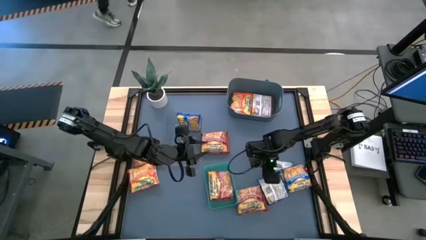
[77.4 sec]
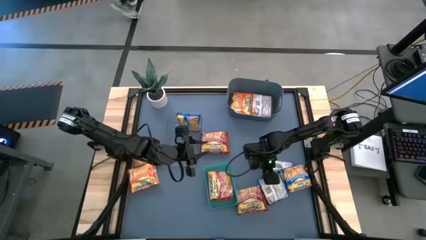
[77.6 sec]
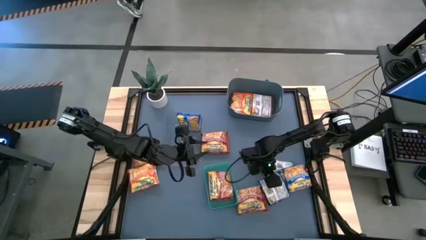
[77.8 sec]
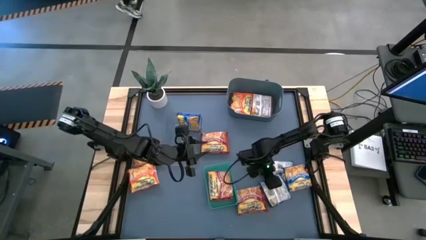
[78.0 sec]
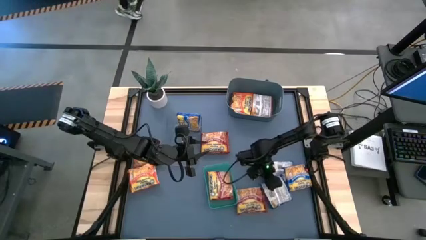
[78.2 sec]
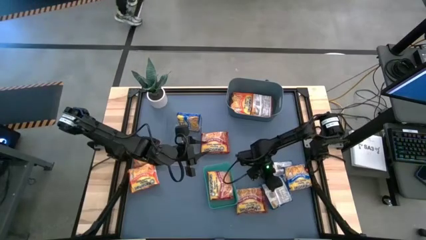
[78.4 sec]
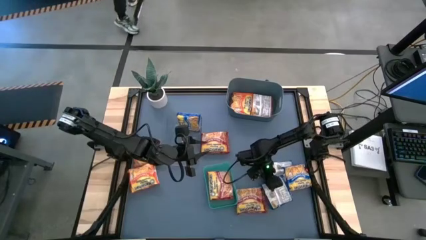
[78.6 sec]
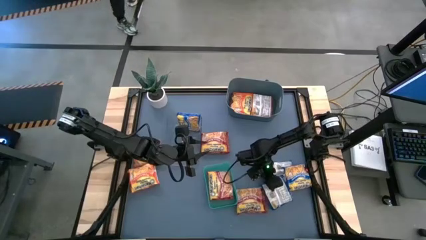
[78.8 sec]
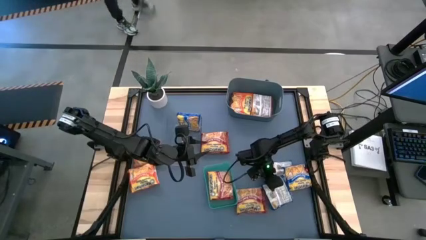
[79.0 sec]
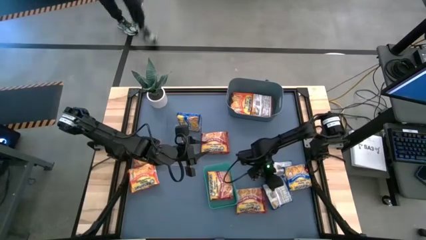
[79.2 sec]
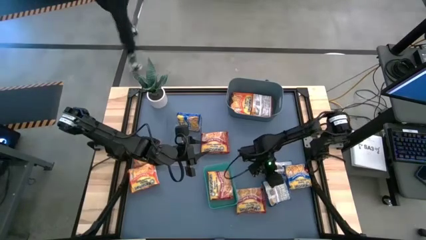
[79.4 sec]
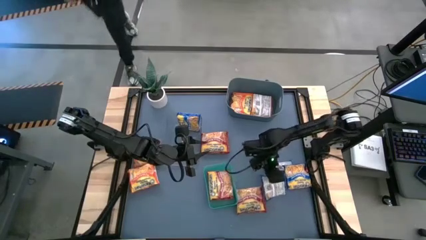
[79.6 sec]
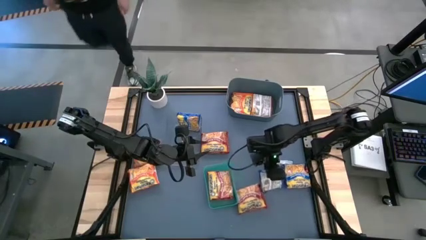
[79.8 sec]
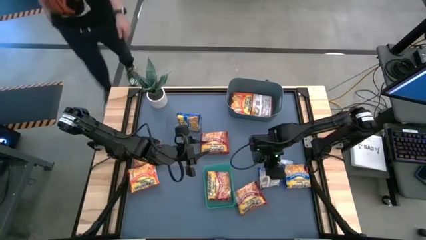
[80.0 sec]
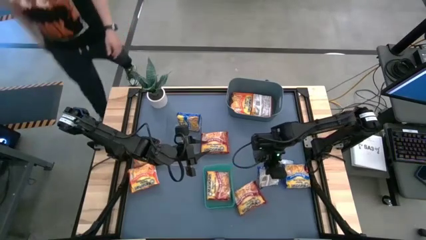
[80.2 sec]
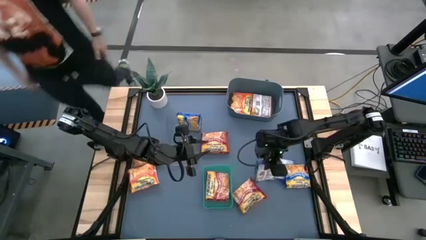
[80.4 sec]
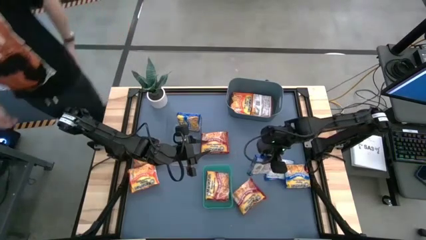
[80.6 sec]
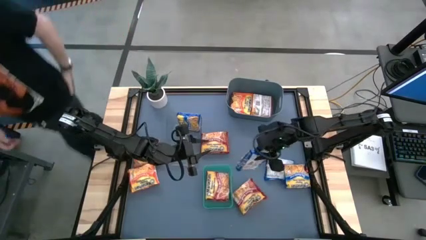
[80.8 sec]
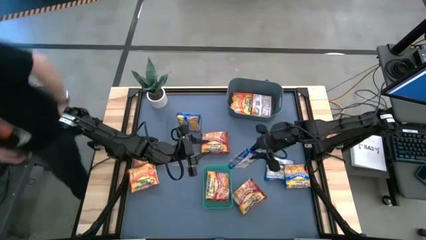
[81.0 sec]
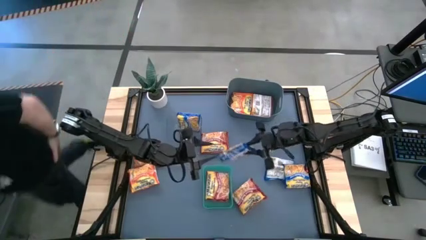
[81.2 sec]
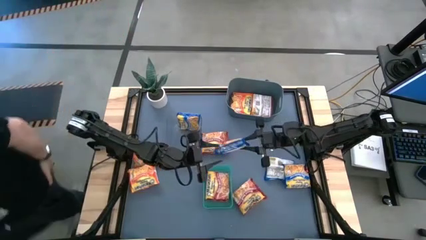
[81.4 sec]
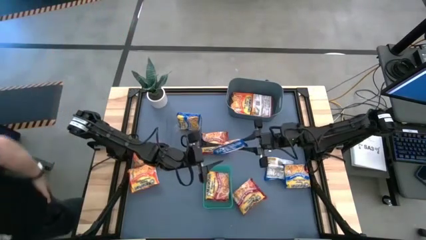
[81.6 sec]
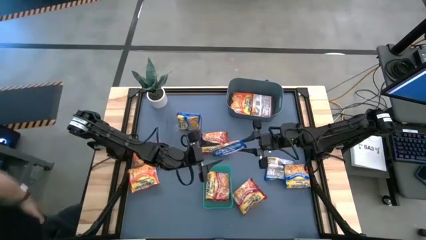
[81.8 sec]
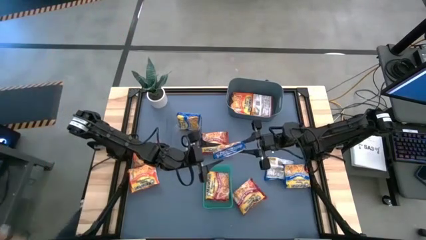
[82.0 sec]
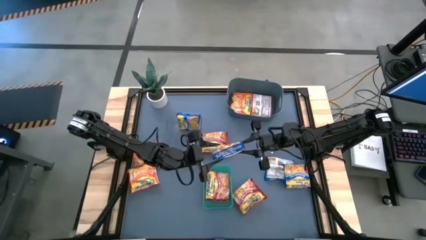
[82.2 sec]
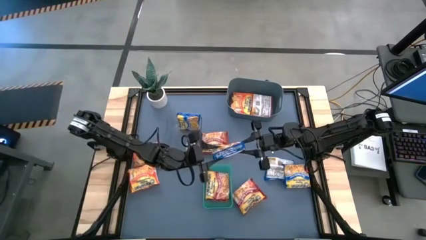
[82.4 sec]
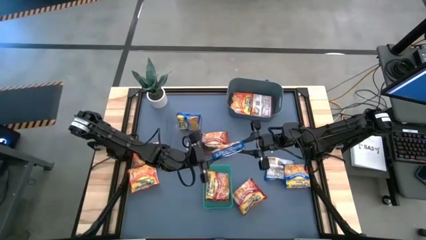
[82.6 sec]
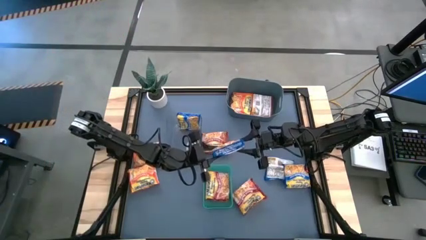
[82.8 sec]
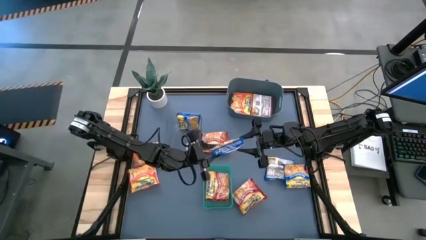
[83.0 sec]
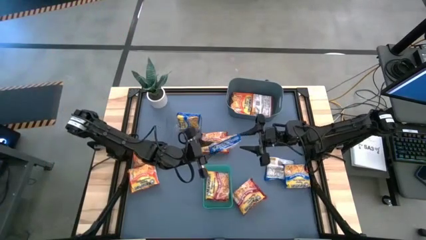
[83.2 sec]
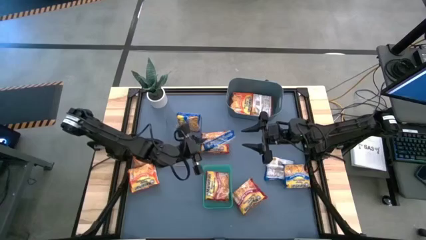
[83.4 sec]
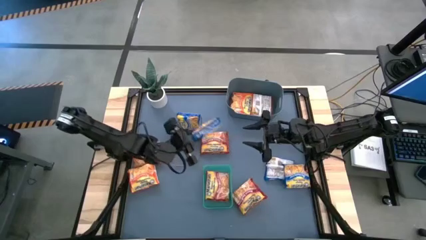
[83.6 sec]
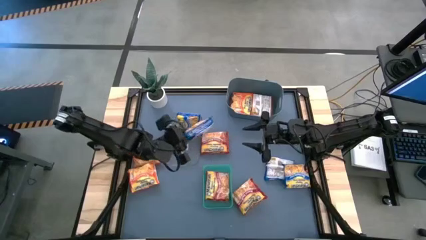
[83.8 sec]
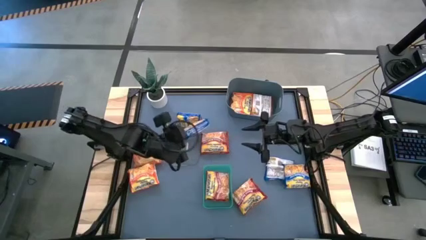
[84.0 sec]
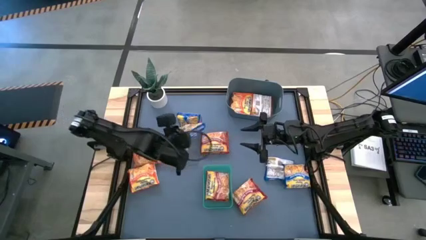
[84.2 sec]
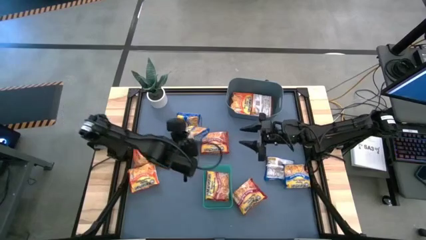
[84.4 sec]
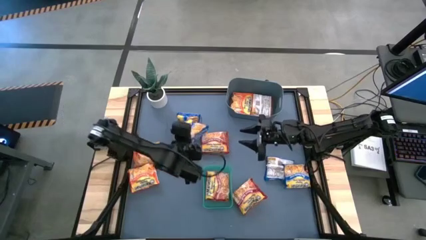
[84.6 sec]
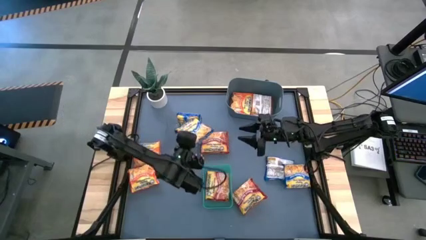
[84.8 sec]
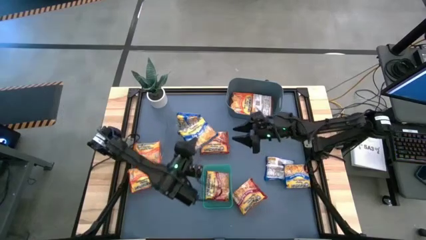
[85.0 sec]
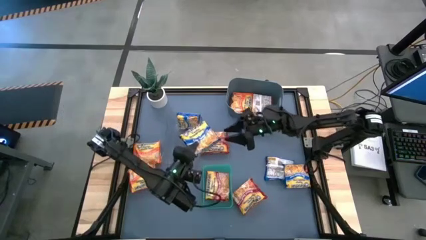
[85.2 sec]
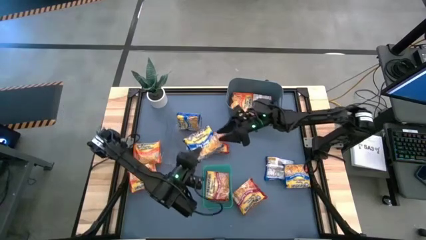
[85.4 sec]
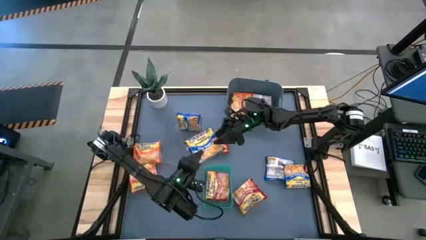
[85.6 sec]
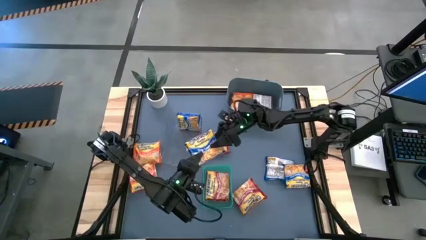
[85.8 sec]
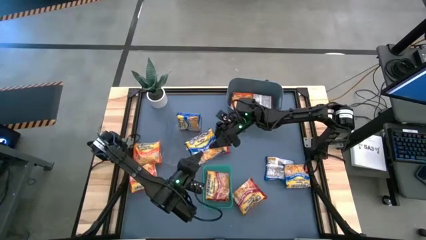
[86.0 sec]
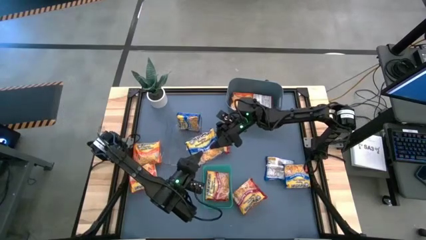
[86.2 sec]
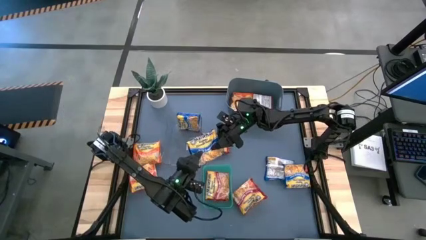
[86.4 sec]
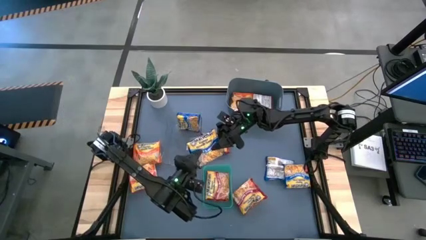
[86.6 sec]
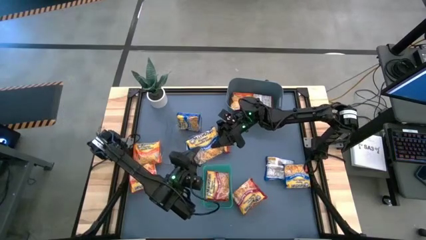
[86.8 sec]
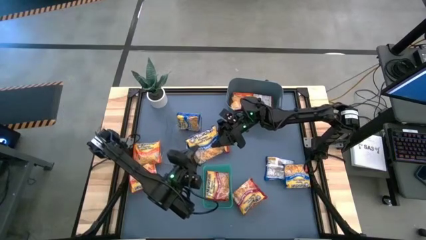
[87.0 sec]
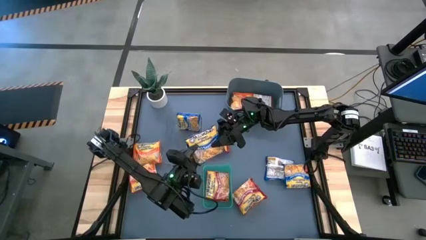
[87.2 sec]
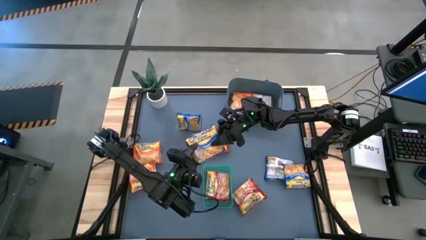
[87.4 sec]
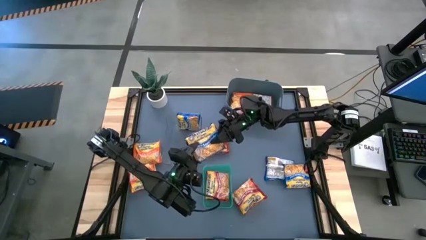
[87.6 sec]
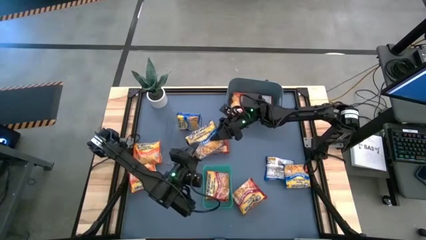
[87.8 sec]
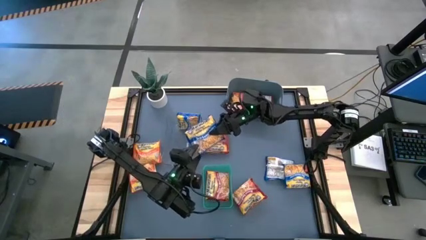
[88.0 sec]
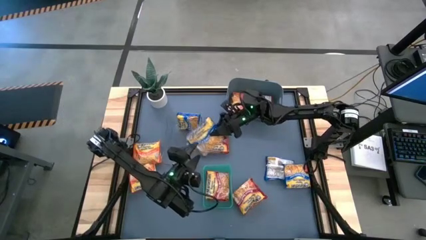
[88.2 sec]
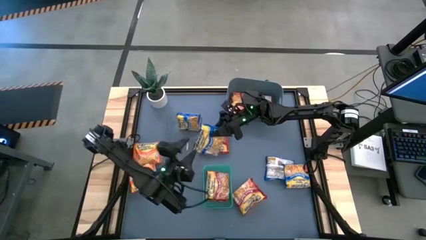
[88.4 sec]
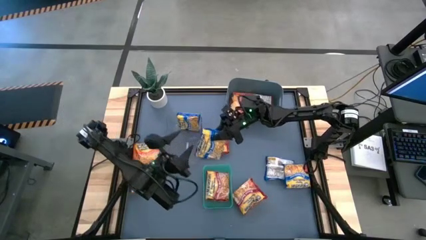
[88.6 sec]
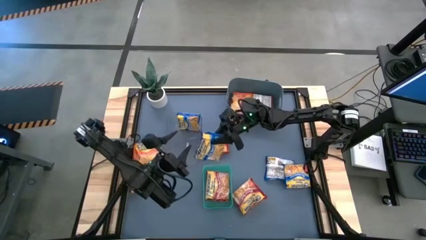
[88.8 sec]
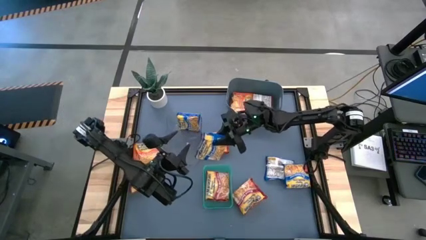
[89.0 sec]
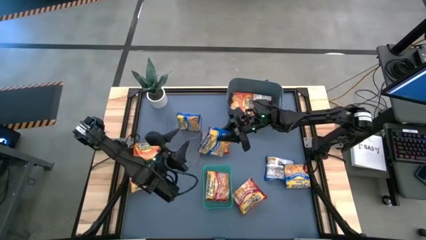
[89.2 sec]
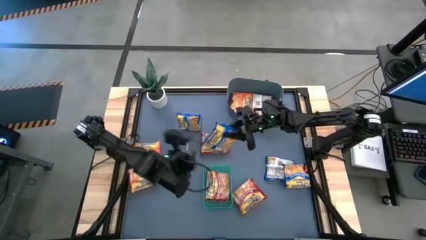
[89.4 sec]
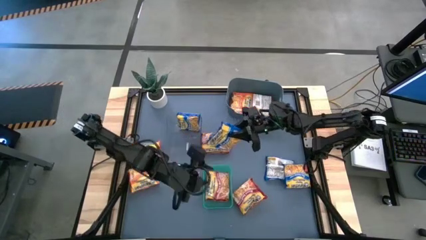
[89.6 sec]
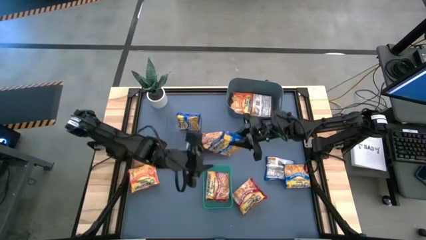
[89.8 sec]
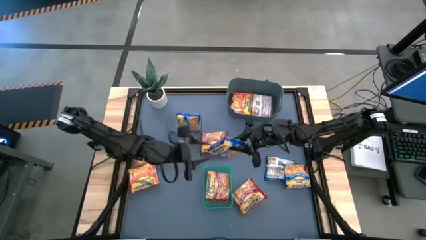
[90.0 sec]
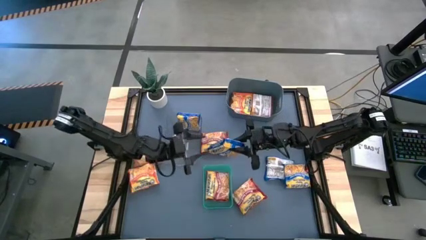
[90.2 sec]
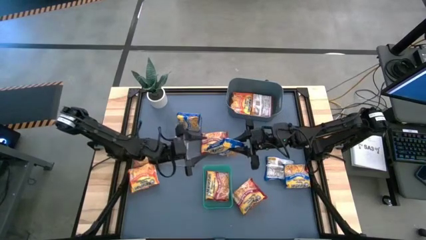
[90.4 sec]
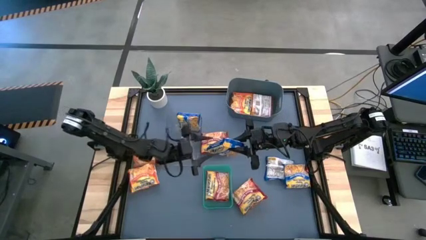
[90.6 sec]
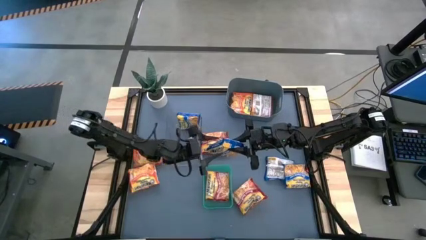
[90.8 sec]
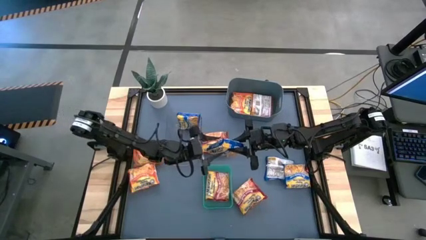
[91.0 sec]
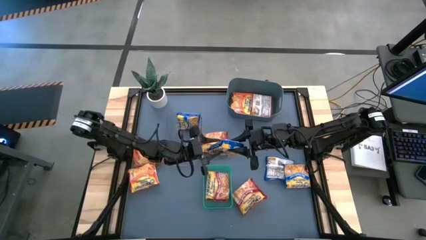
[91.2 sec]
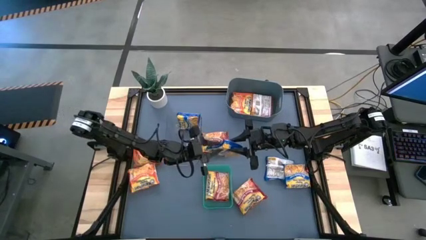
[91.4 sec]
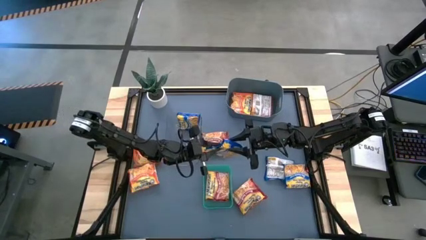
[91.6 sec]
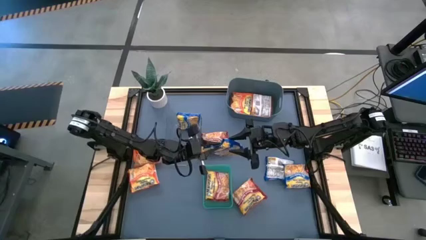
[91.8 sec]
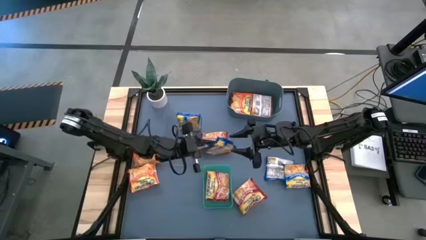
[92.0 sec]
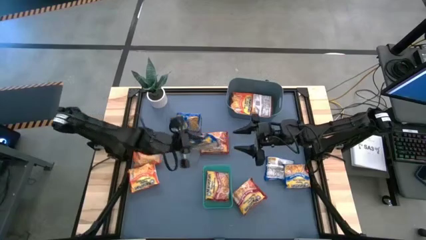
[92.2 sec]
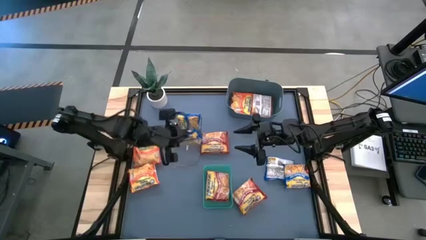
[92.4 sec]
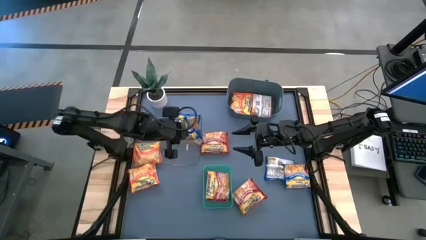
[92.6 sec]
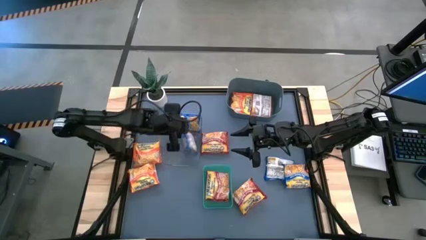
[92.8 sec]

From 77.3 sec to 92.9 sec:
Task: Sort Maruchan noodles
Put the blue noodle pack into the transparent bin
